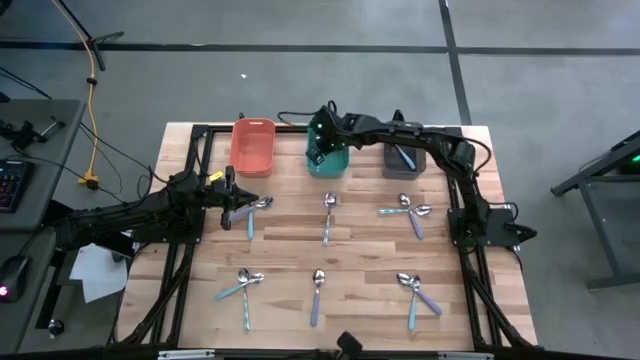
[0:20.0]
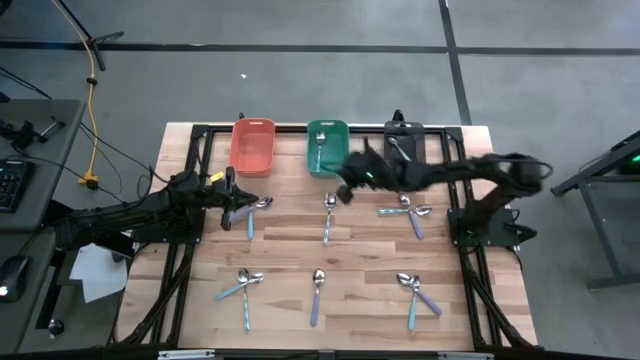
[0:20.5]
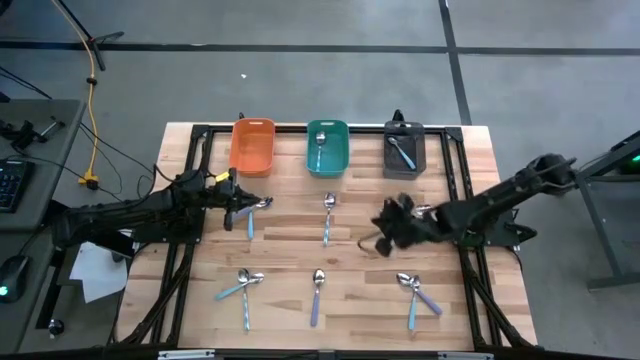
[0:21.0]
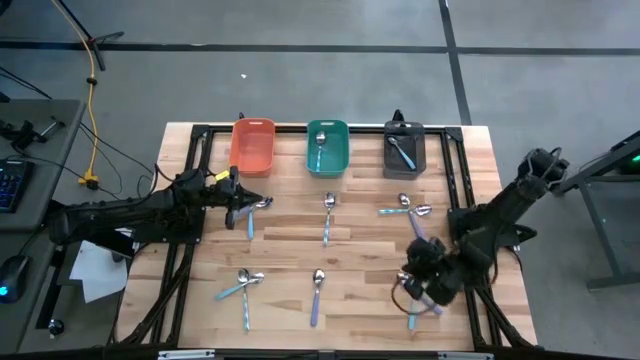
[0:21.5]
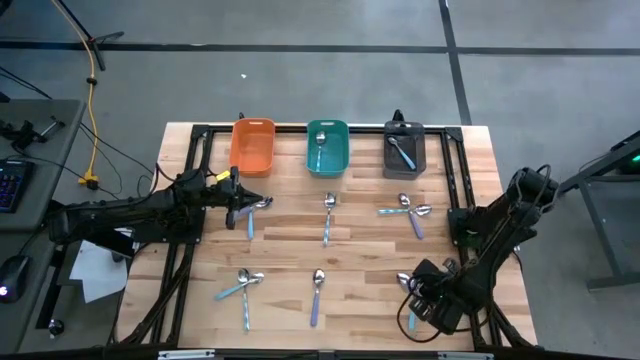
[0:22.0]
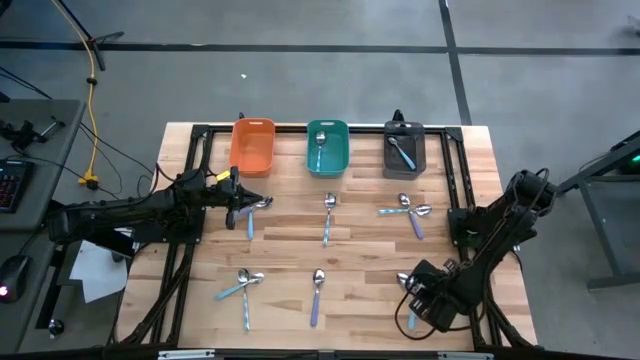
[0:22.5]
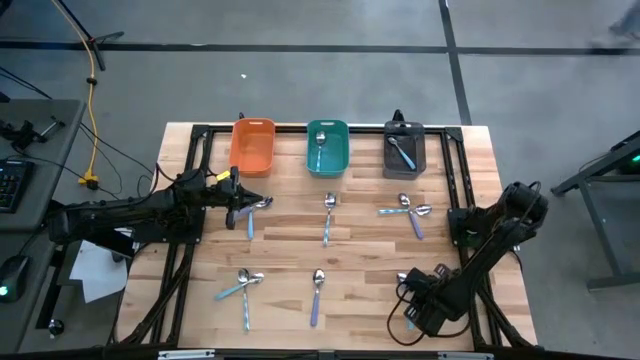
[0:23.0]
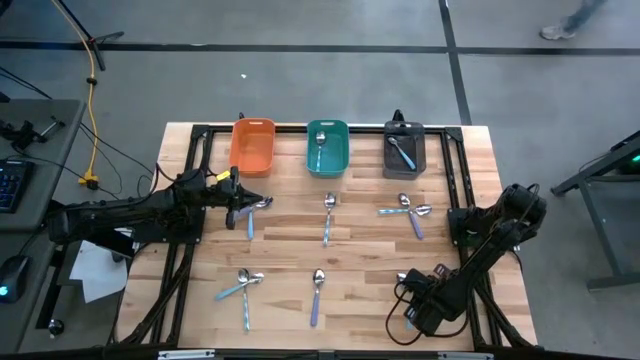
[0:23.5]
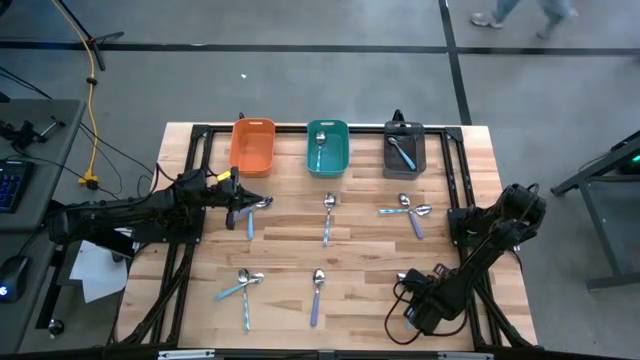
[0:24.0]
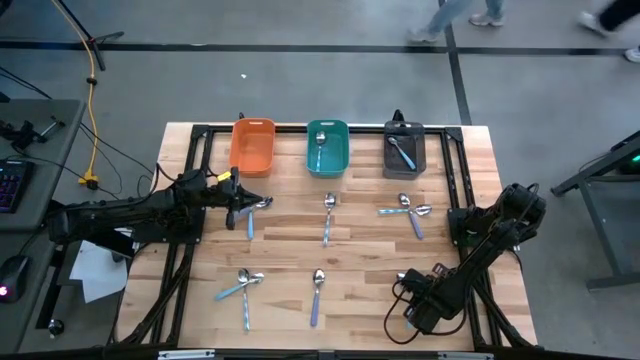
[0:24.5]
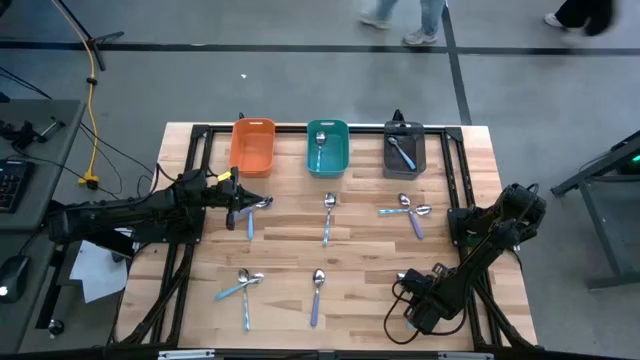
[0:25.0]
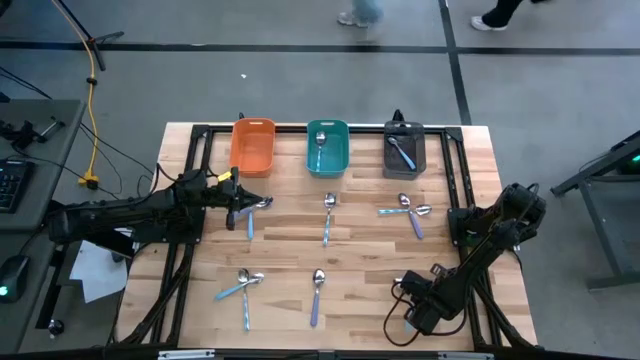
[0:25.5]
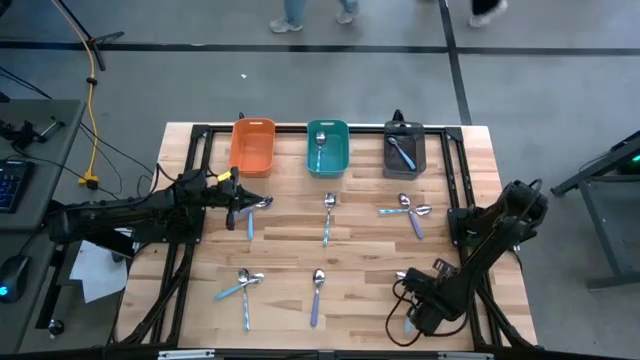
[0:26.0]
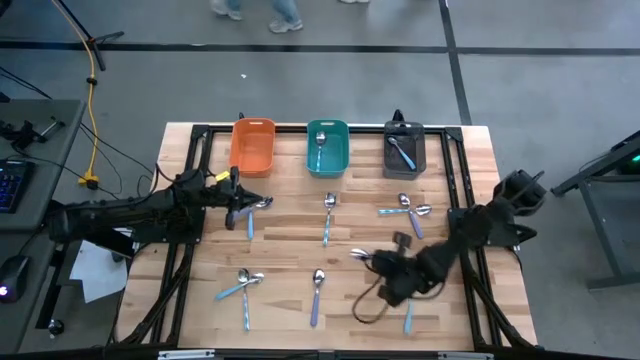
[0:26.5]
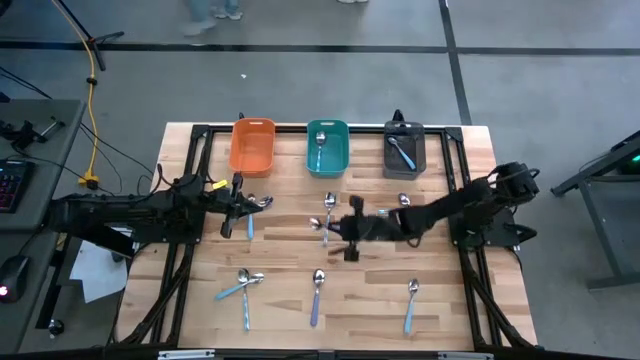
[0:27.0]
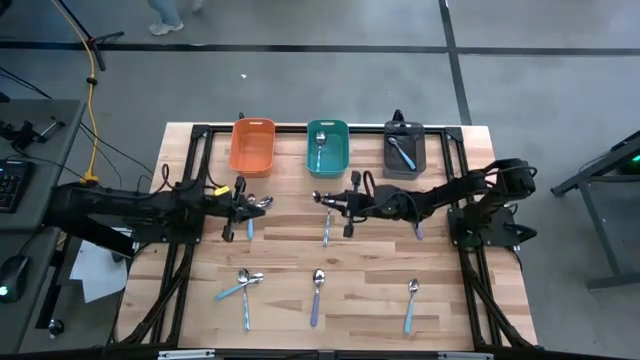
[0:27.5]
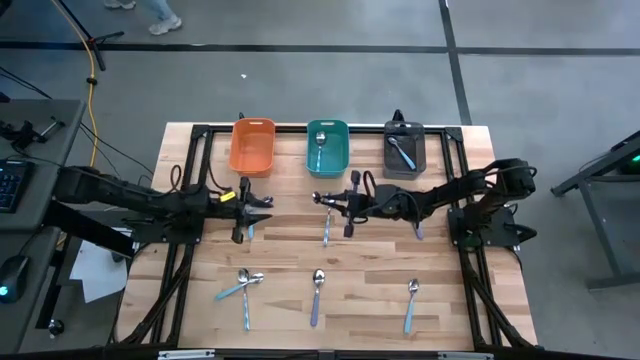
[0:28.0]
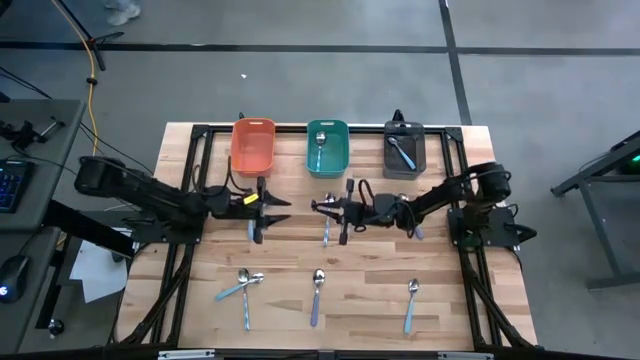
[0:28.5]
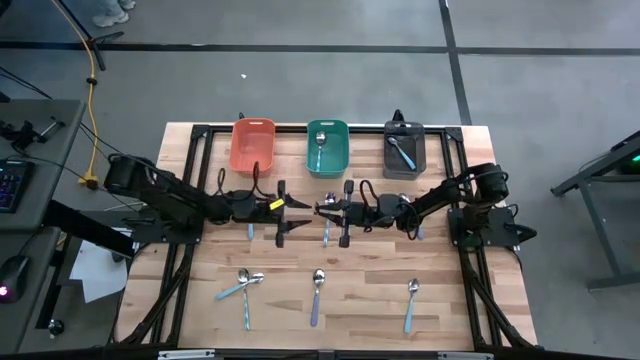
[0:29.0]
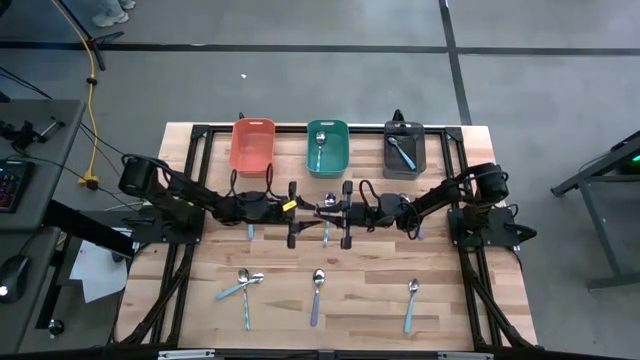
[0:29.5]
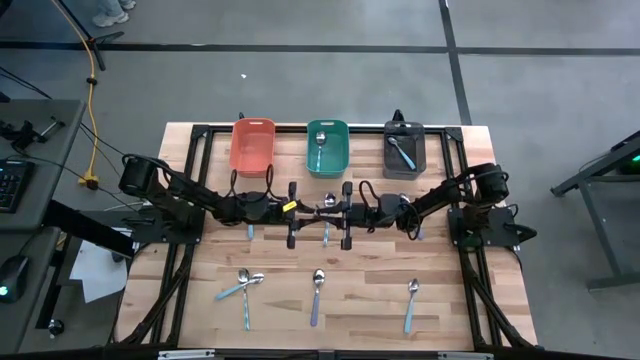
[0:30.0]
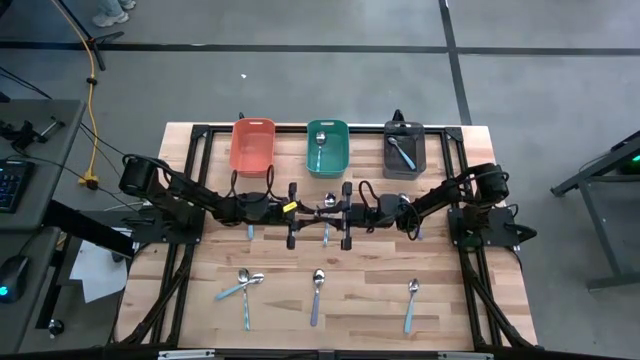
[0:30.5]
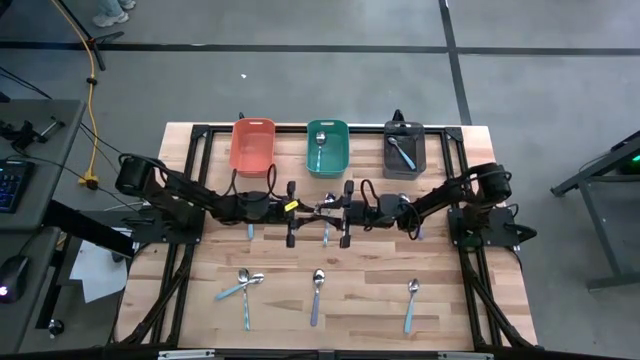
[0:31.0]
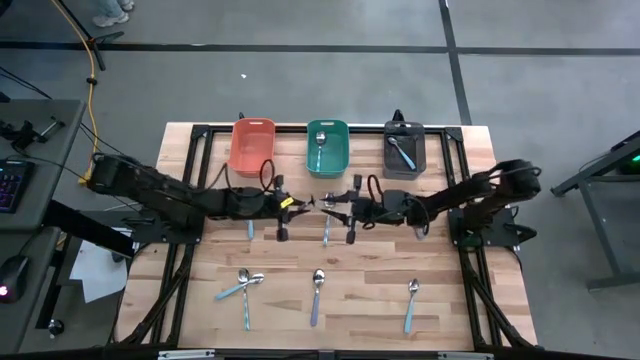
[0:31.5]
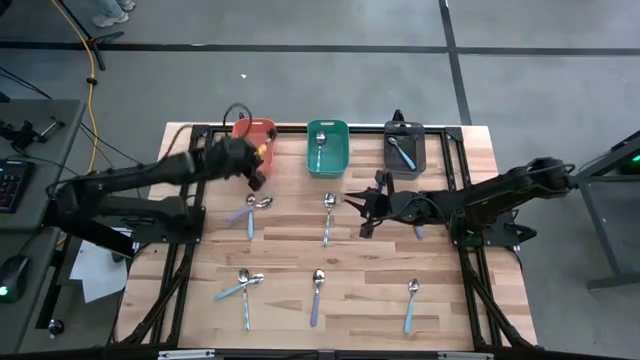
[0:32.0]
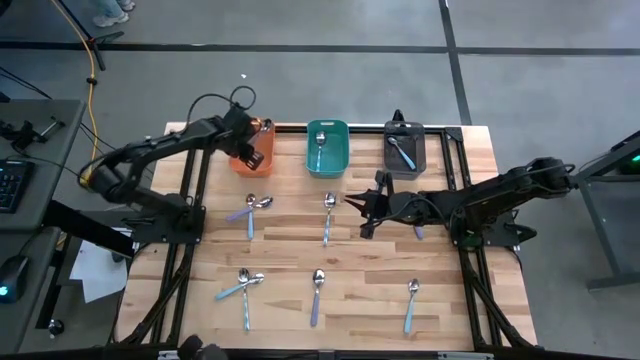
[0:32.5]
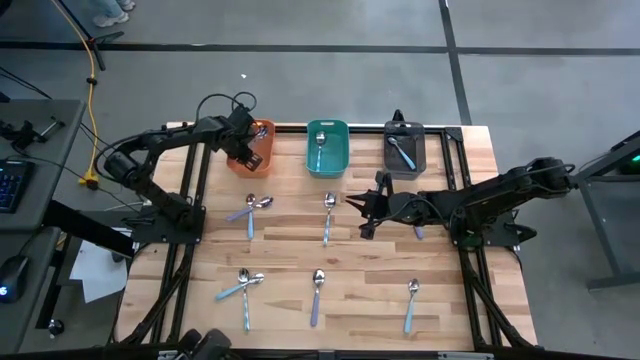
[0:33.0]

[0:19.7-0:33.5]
Task: Sort silverware by color (type)
Put the purple spoon into the orange bin

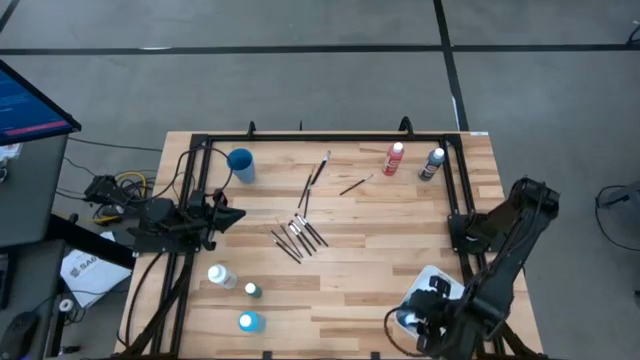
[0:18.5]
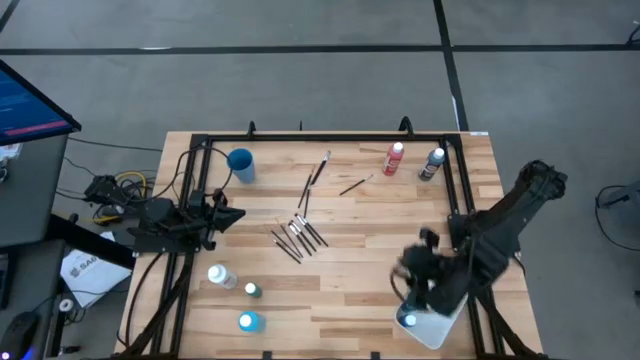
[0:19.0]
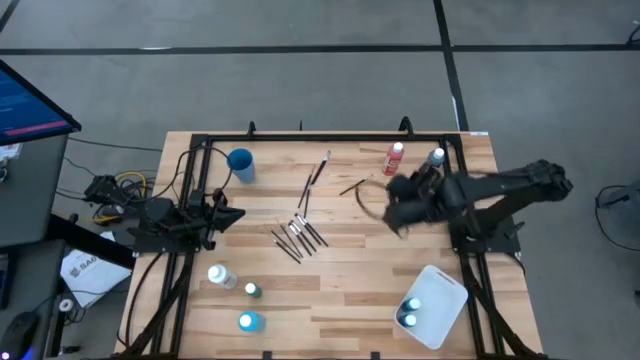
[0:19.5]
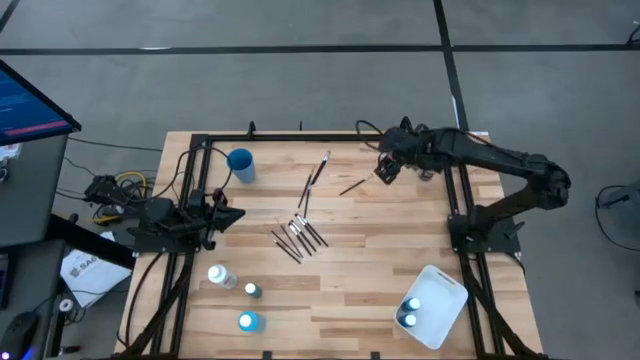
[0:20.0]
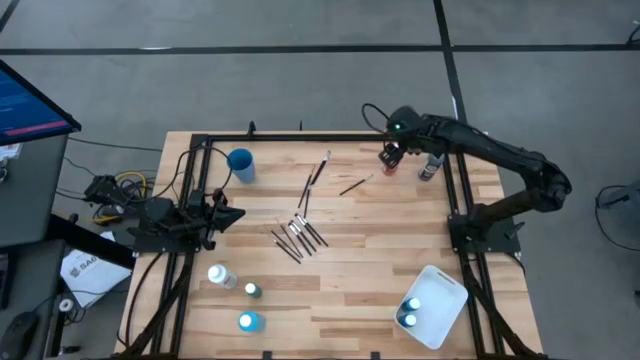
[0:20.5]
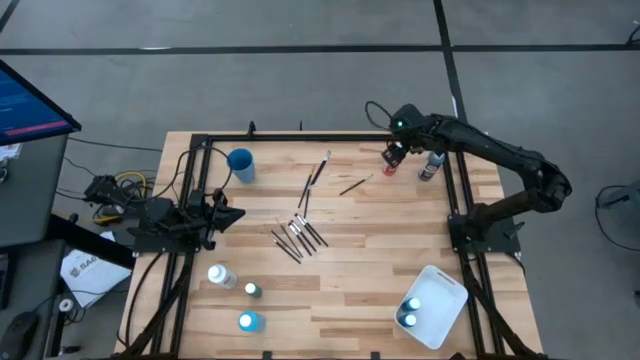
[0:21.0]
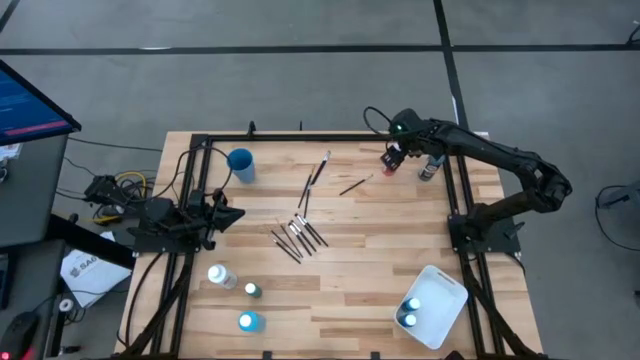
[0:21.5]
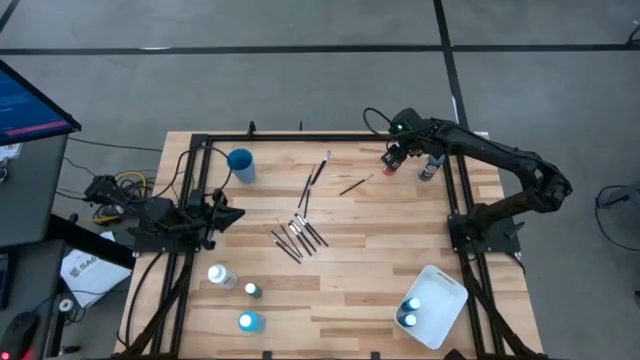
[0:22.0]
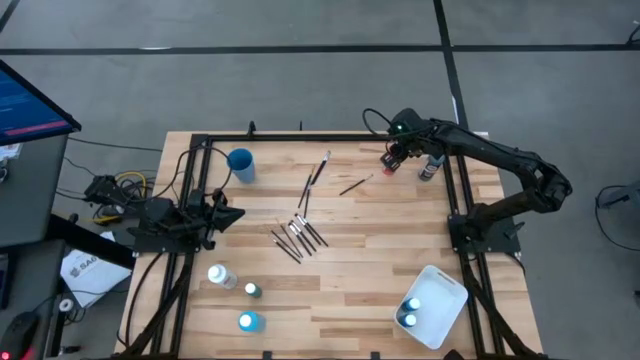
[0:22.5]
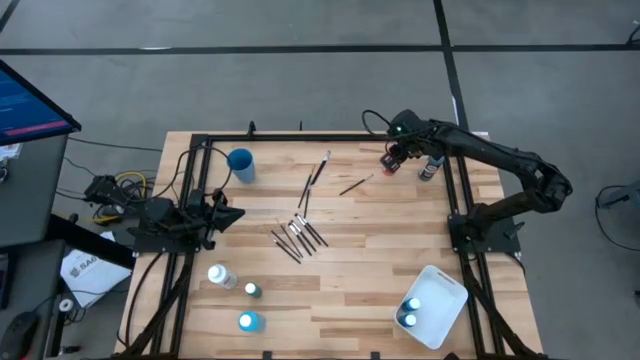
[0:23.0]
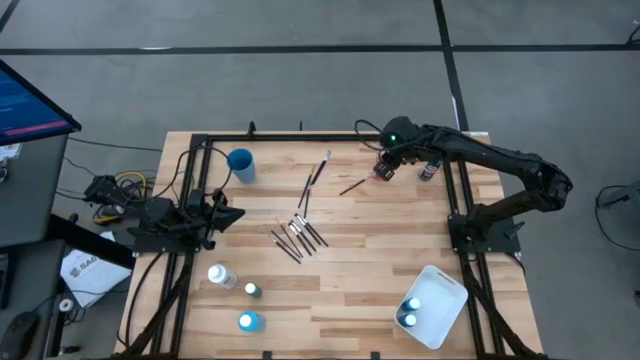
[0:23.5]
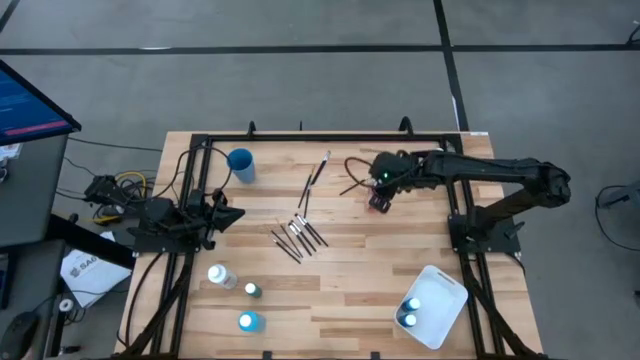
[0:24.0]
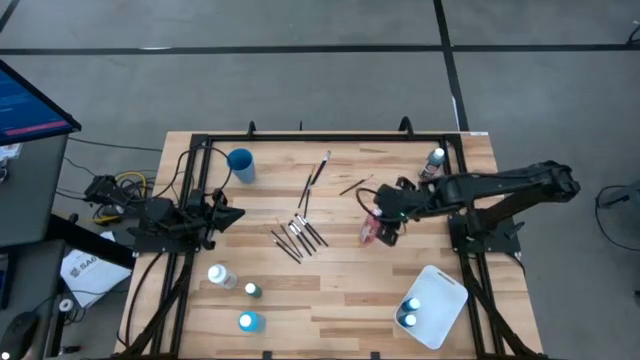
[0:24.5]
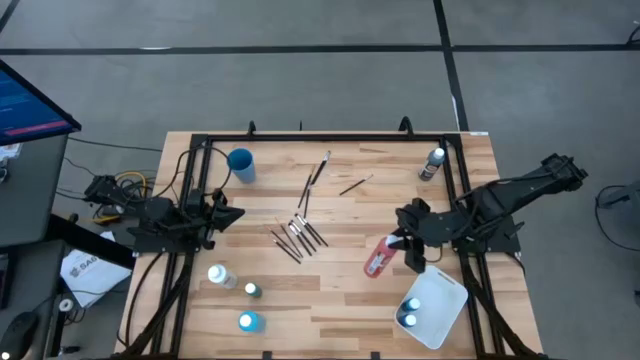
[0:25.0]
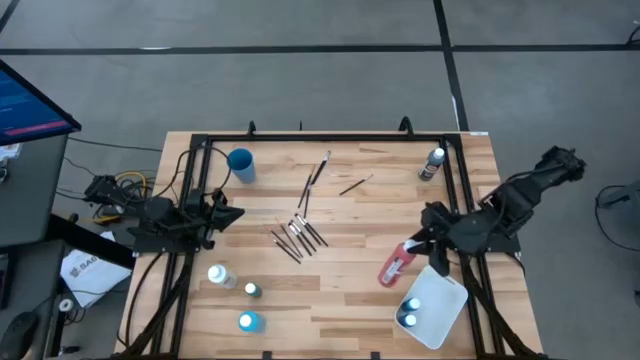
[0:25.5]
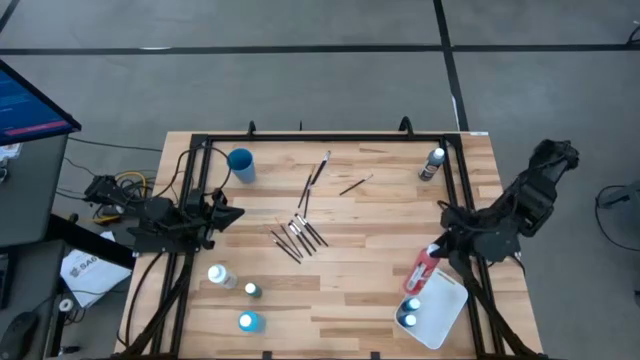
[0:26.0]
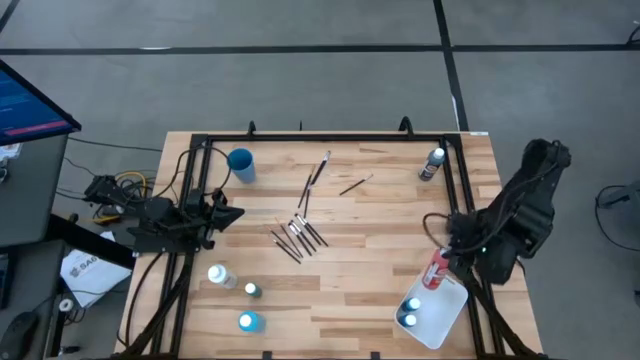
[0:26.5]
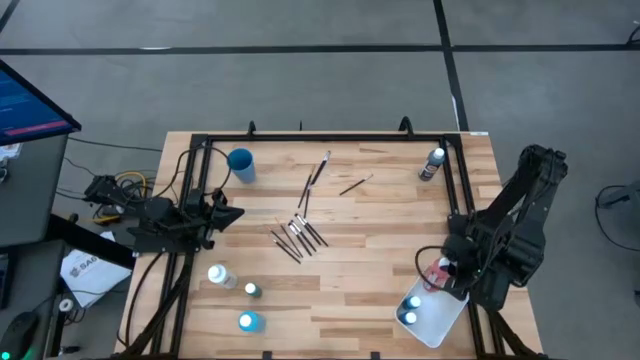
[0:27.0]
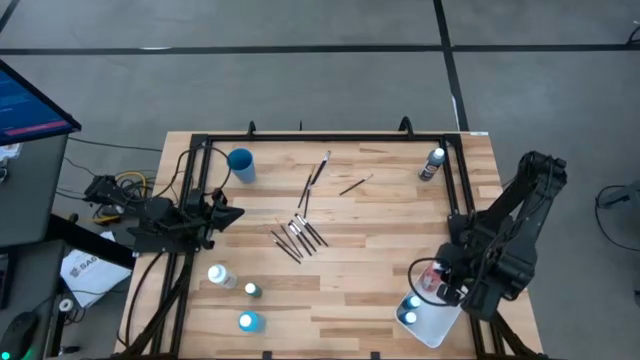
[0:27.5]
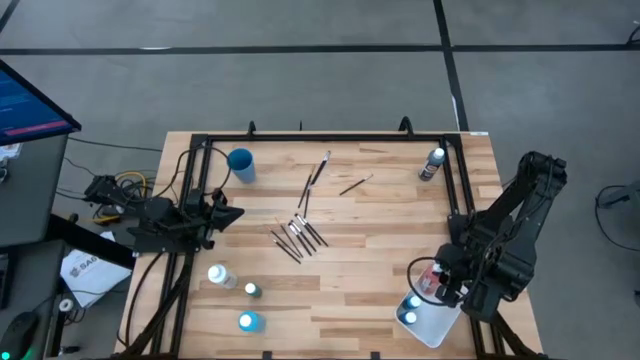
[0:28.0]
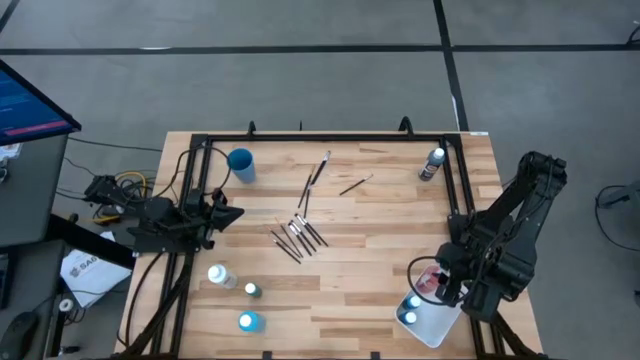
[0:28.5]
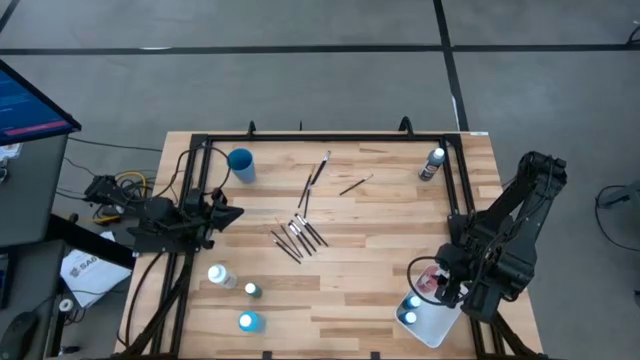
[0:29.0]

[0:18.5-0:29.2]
Task: Pick & Place Paint Supplies
Put the large pink paint bottle into the white bin
